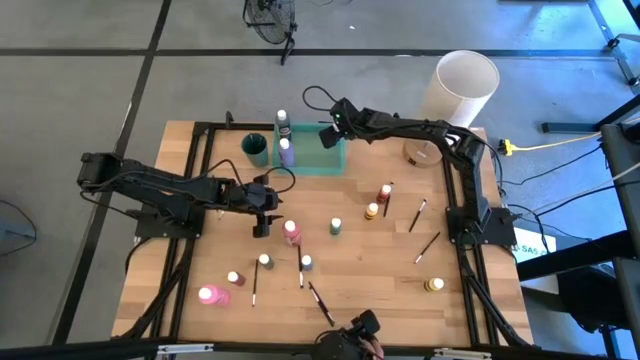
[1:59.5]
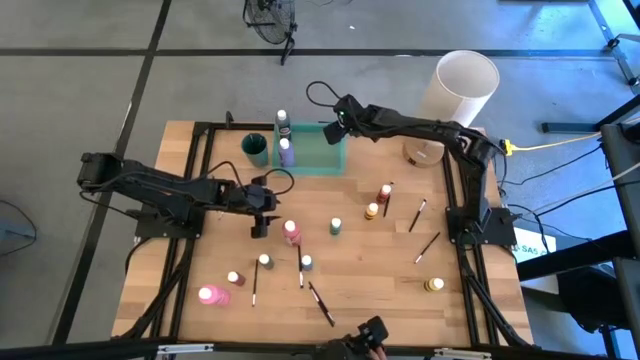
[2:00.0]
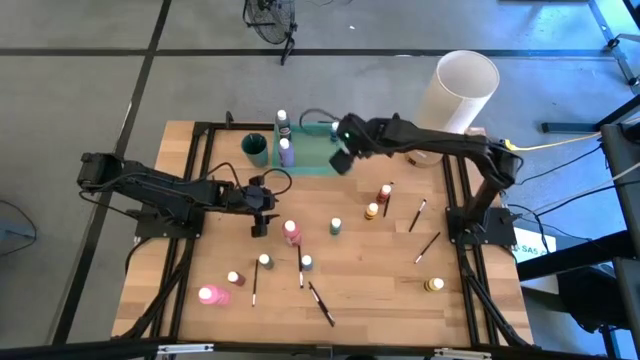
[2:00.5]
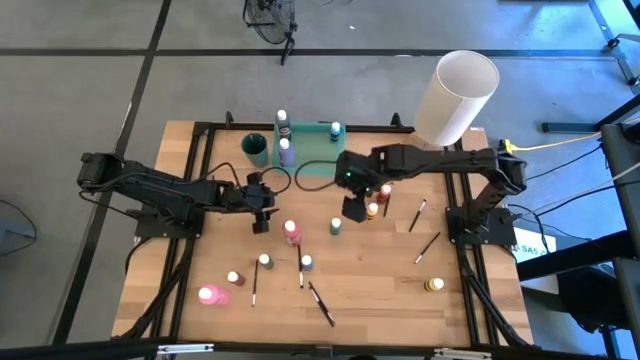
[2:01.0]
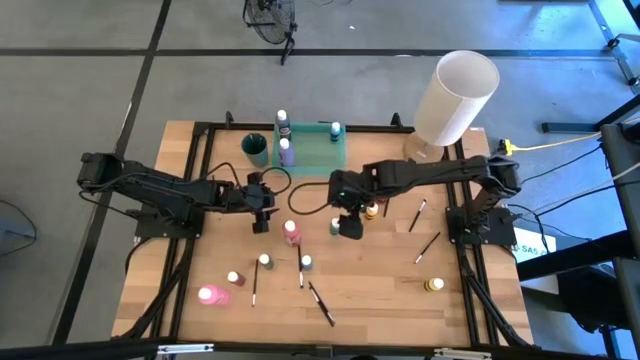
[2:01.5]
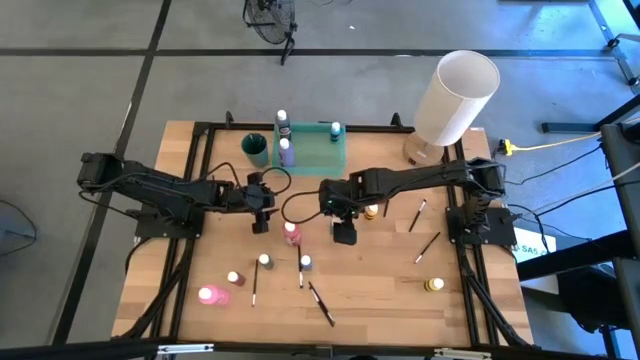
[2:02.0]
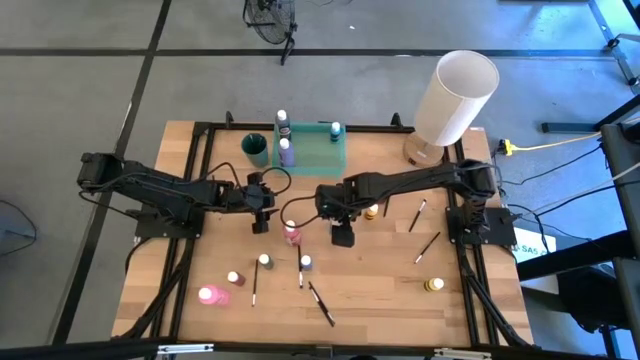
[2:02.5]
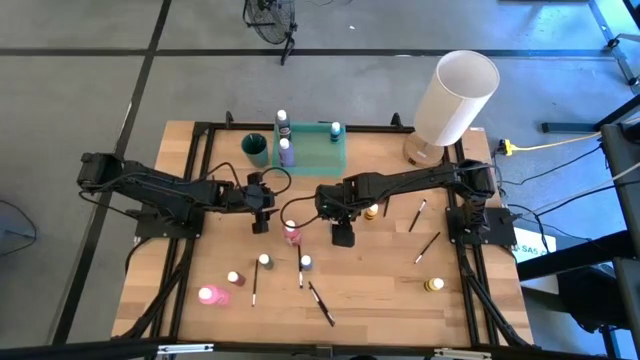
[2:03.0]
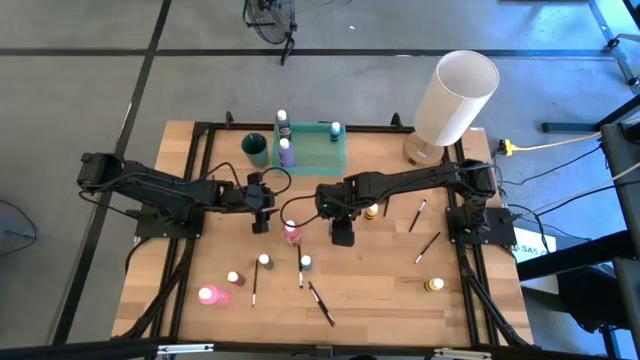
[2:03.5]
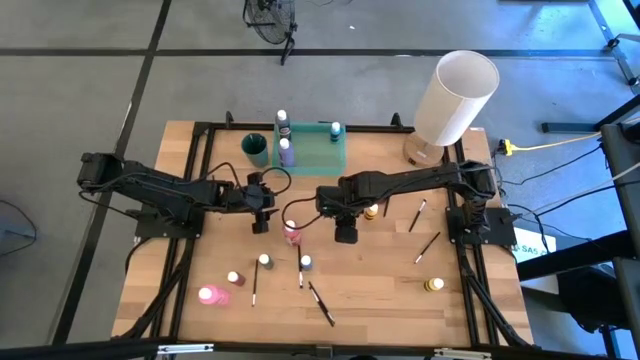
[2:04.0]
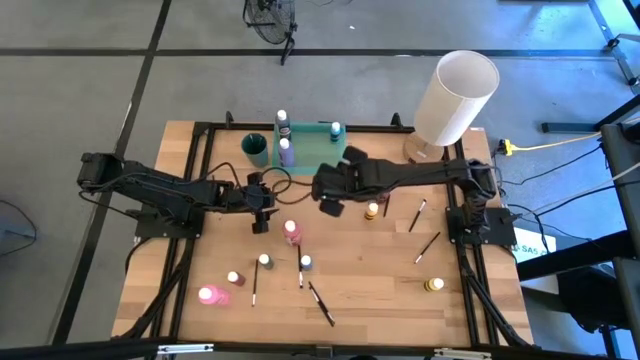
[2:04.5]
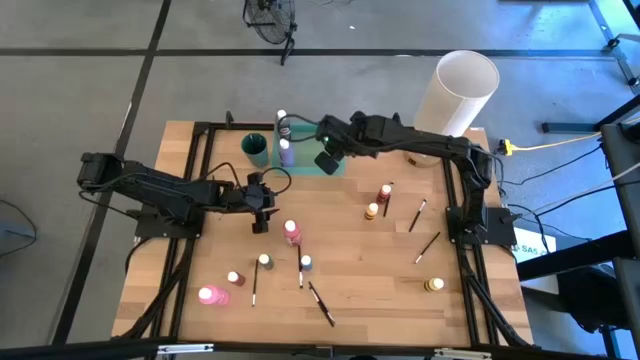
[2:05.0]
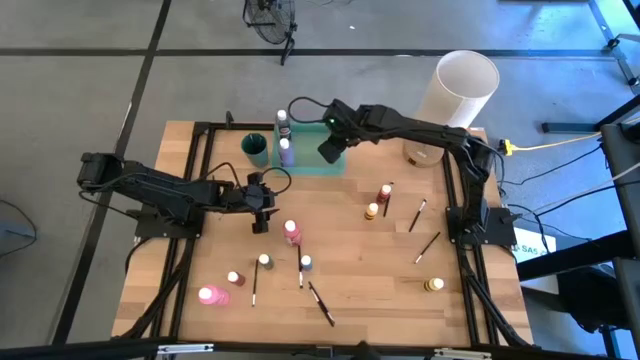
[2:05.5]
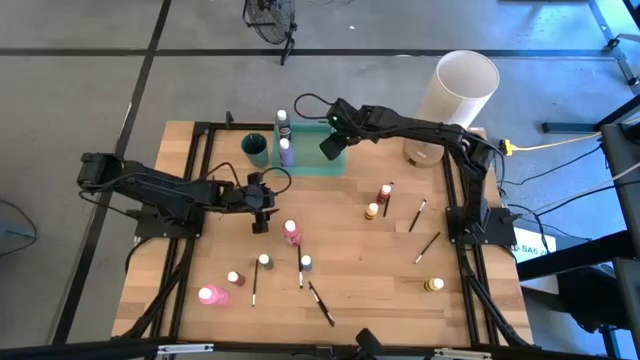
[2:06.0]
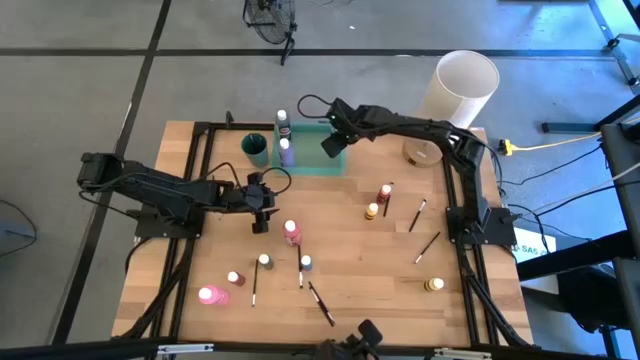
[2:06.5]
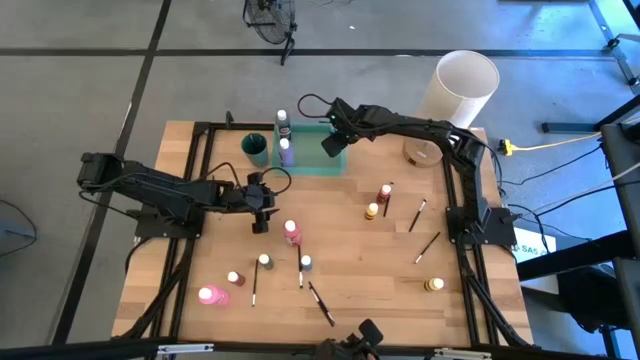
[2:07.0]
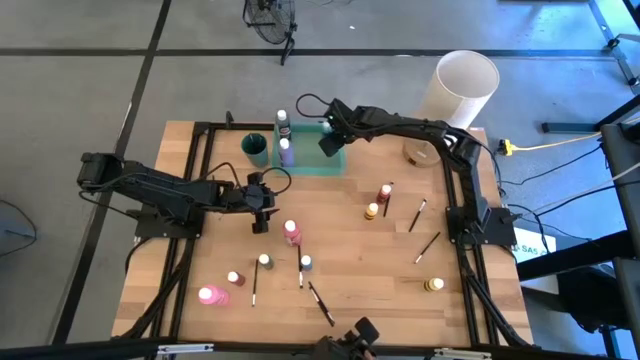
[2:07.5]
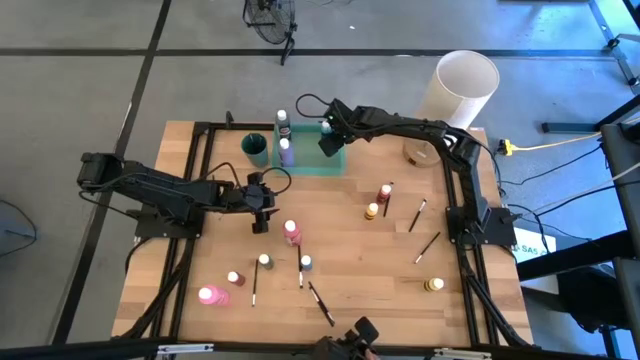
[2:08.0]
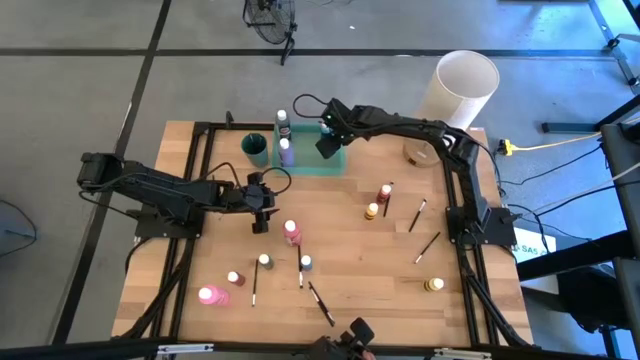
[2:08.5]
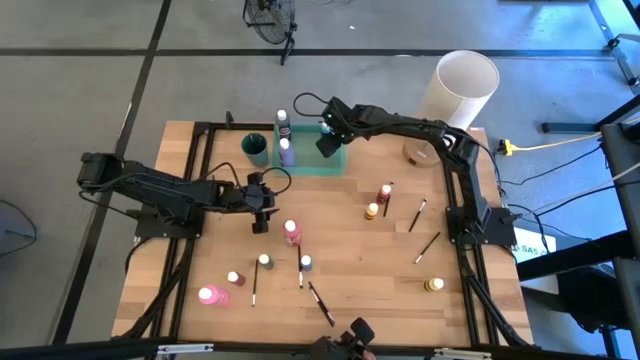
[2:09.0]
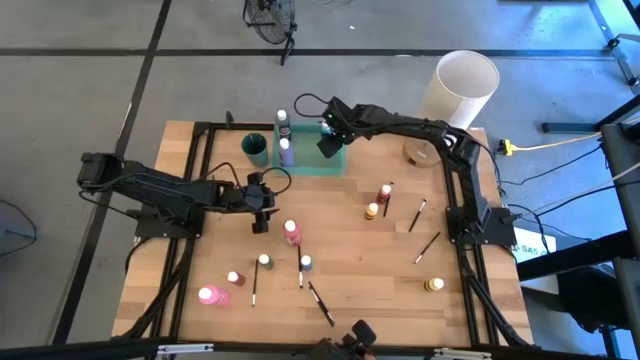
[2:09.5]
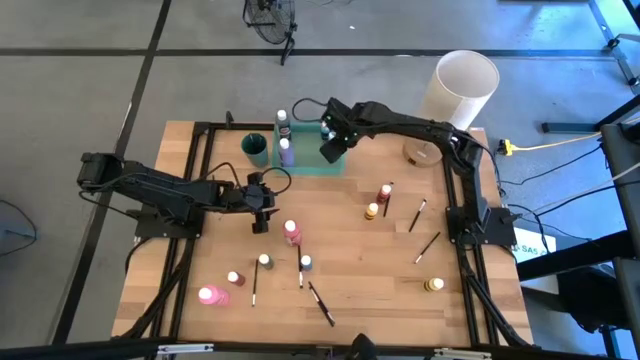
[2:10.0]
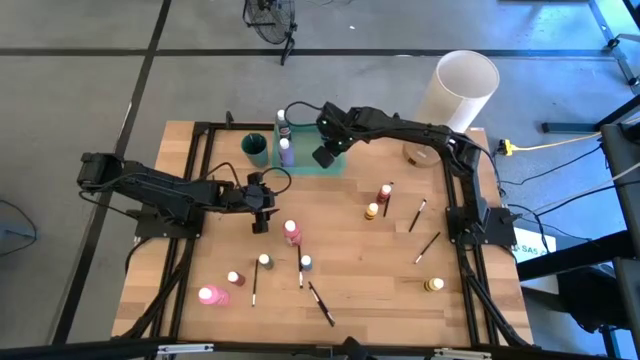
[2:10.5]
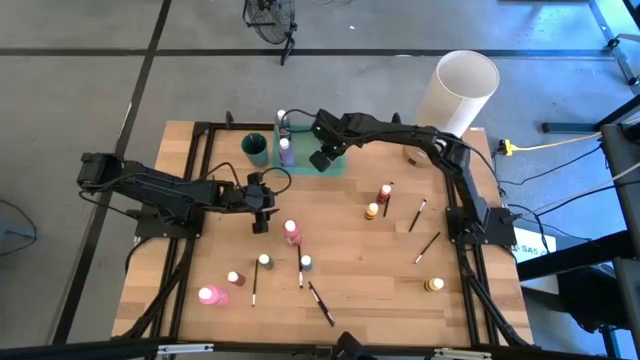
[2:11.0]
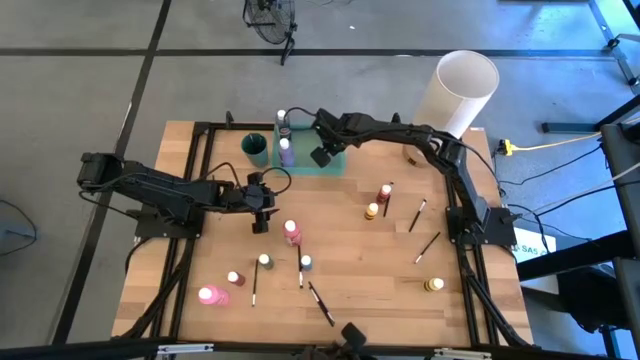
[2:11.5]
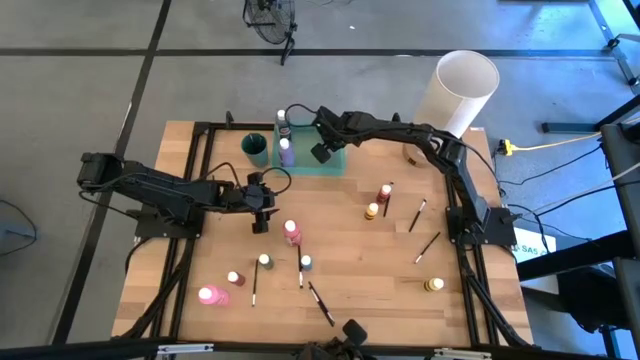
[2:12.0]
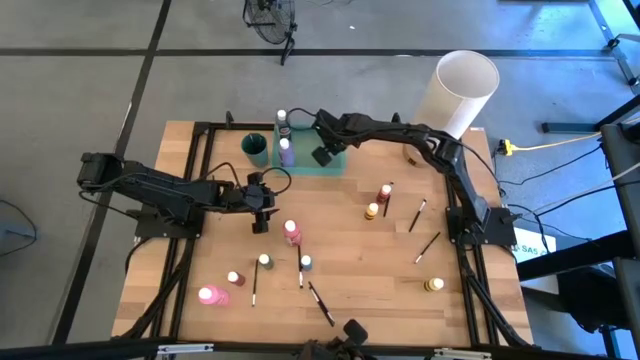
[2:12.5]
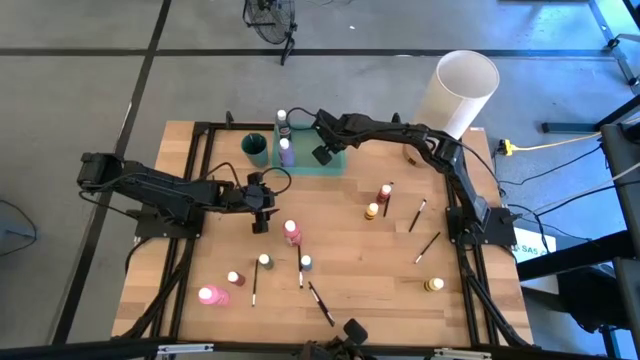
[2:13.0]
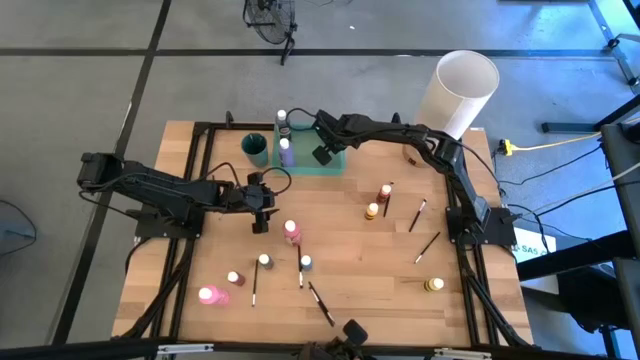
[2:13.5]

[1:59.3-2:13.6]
Task: Pick & Place Paint Supplies
Put the top small green paint bottle into the green cup

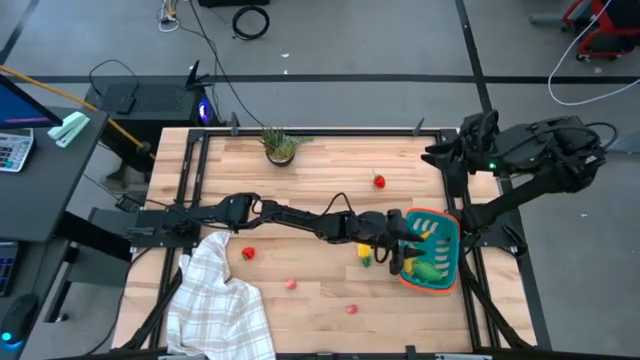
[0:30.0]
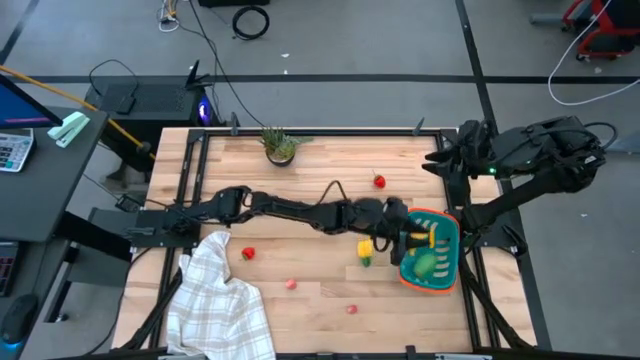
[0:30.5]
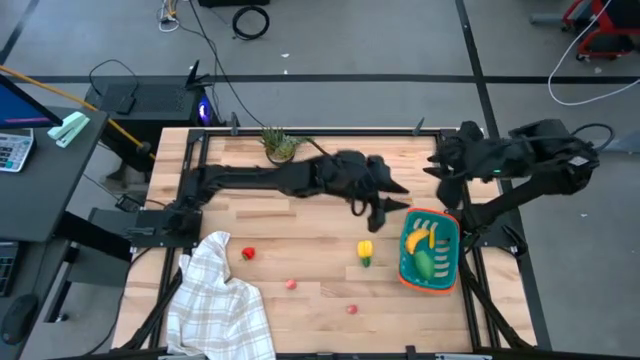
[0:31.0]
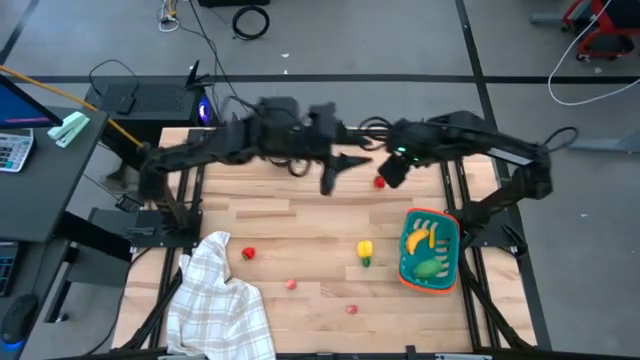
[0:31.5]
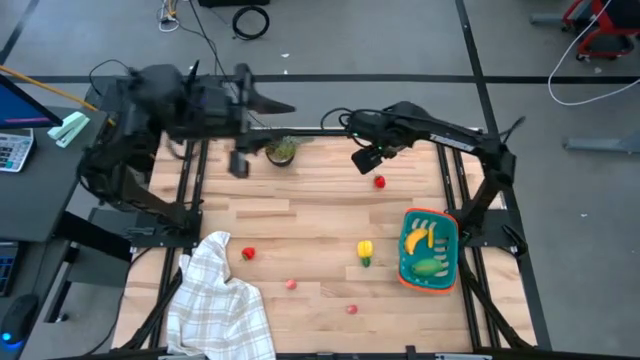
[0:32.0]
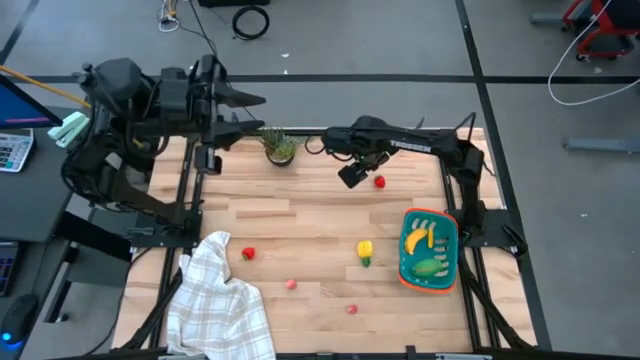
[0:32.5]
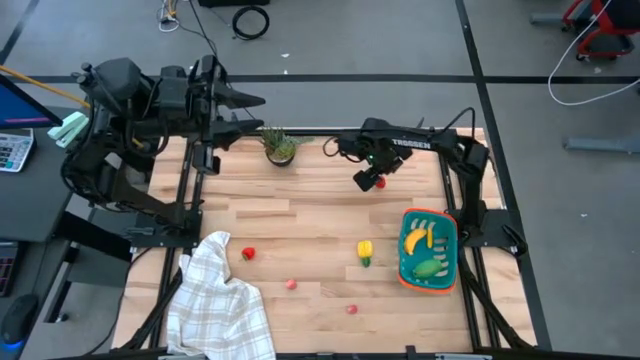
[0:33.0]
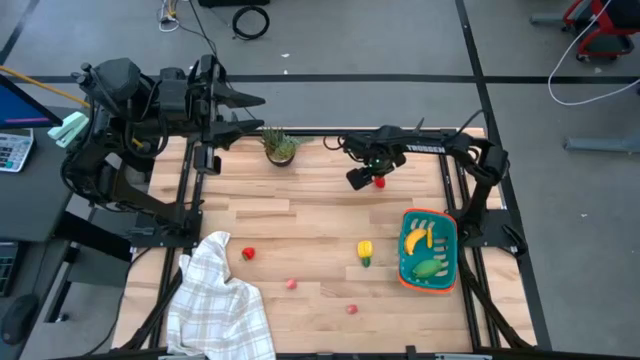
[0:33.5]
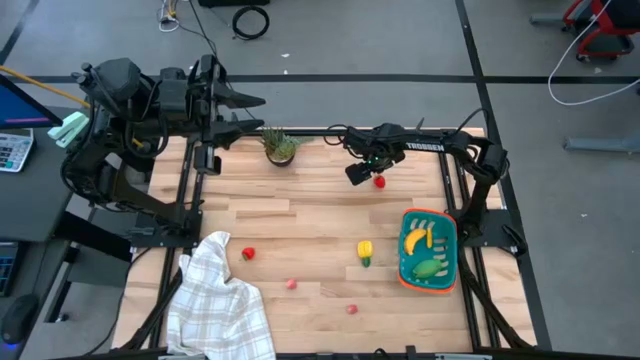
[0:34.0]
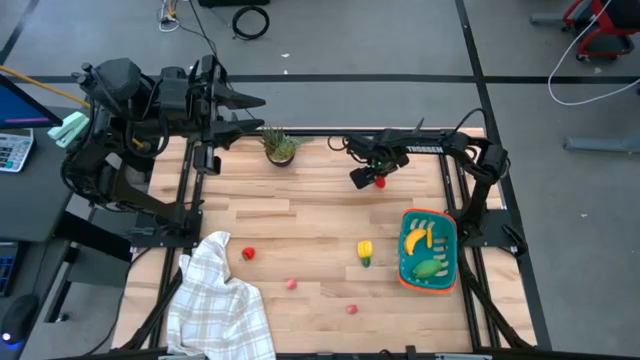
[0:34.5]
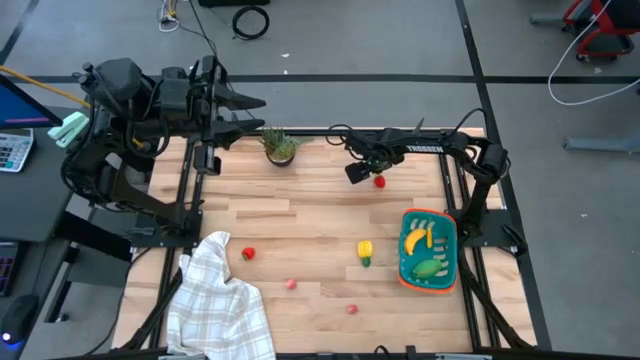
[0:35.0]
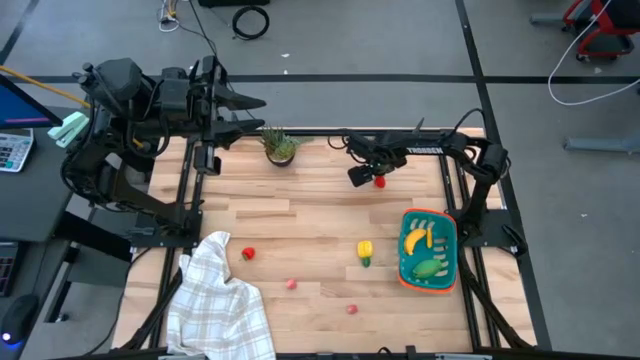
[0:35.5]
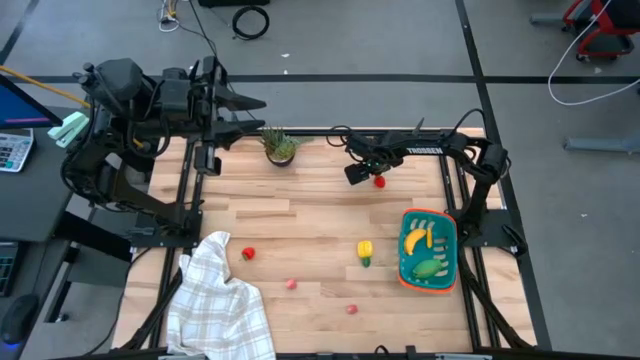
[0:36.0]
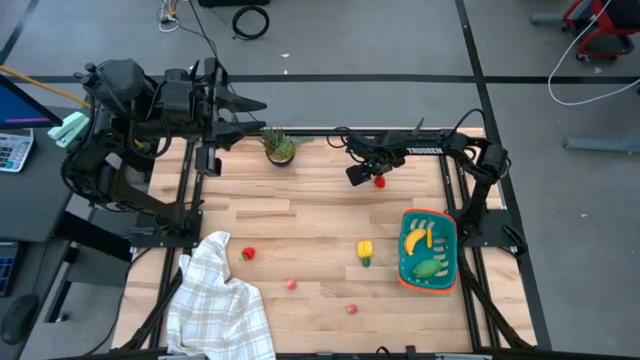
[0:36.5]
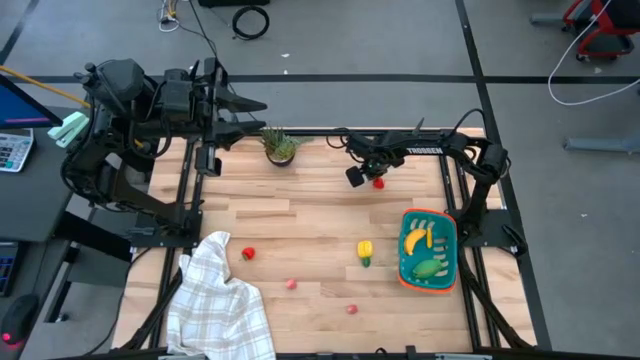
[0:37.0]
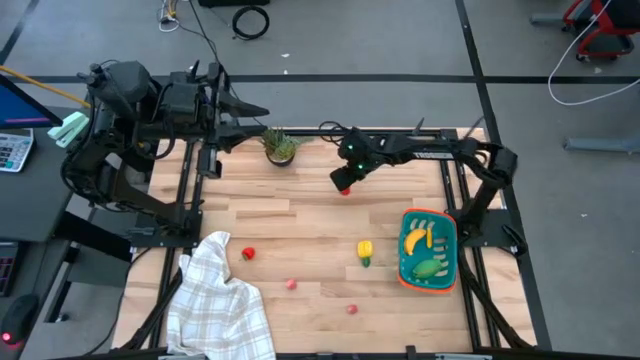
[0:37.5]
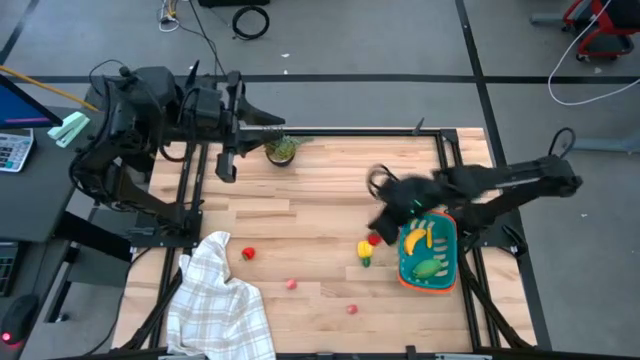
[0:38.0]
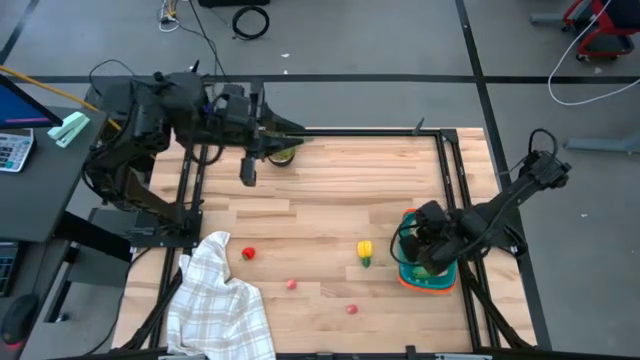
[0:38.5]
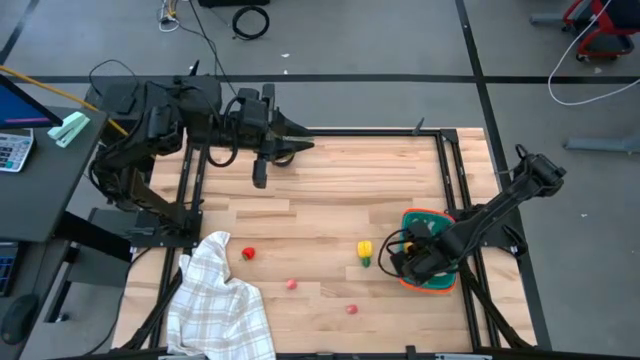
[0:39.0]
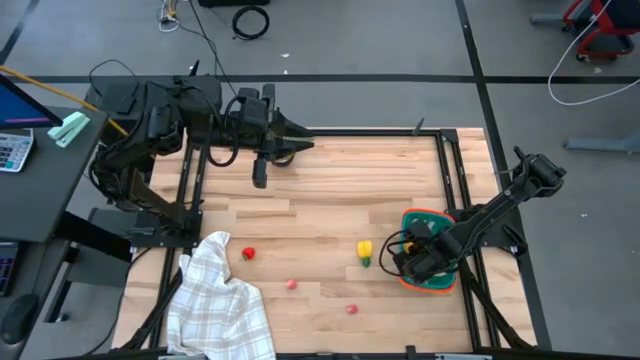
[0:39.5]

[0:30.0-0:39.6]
Task: Pick and placing Produce into tupperware
Put the right red strawberry into the blue basket
